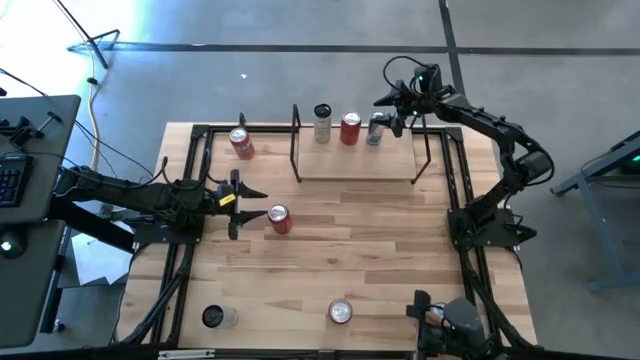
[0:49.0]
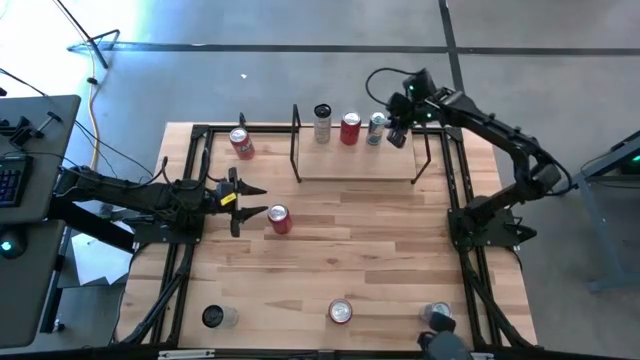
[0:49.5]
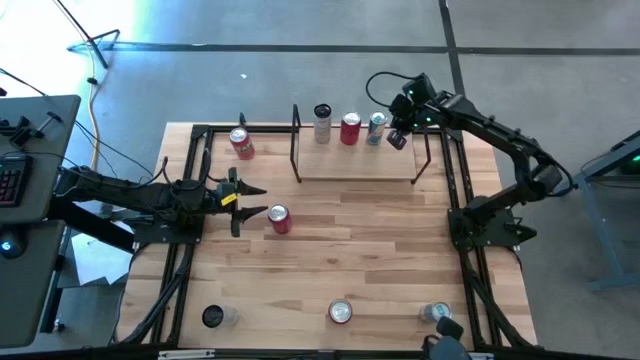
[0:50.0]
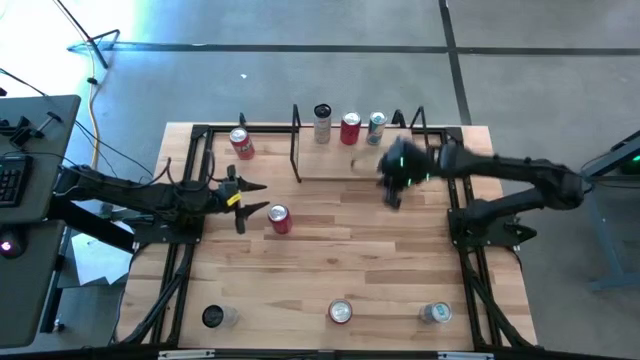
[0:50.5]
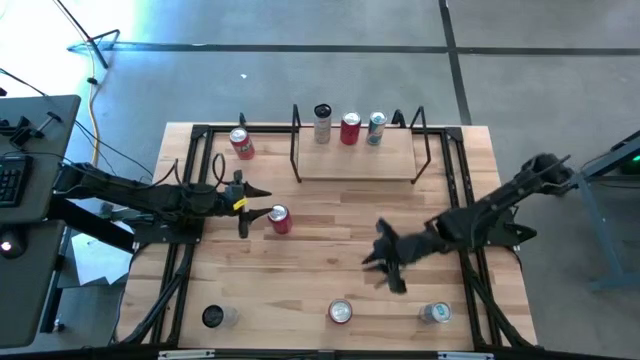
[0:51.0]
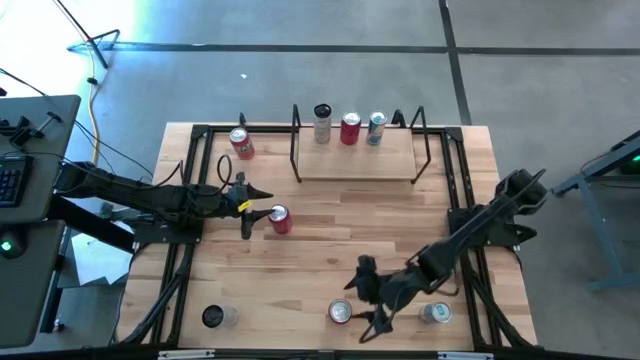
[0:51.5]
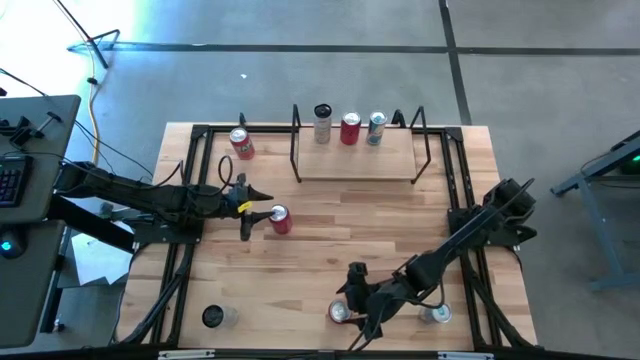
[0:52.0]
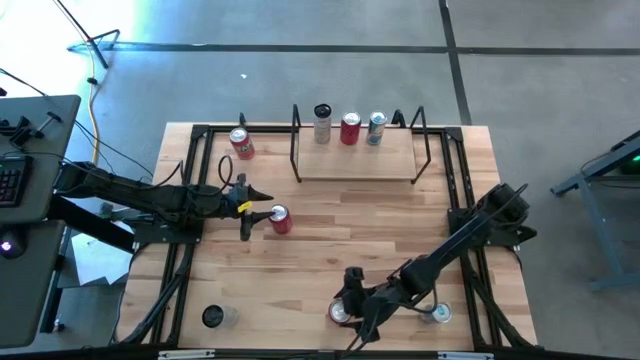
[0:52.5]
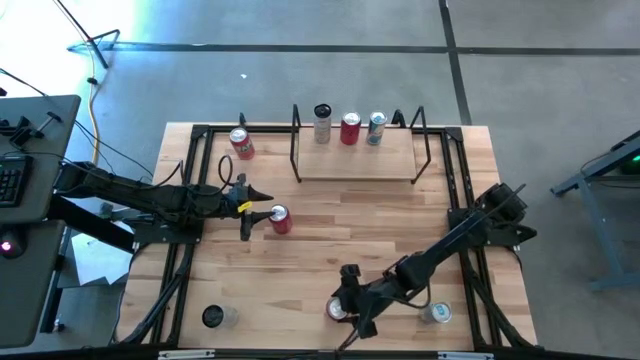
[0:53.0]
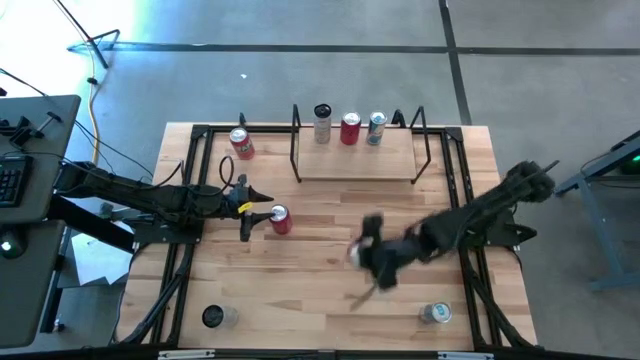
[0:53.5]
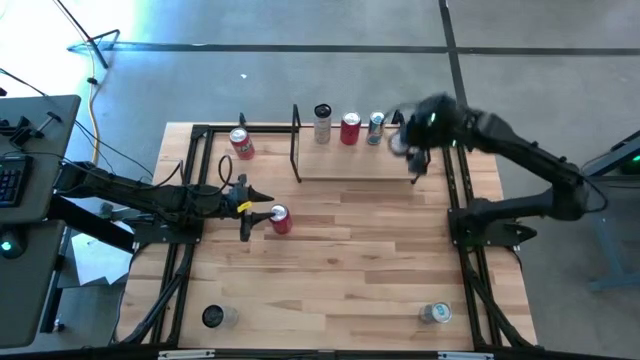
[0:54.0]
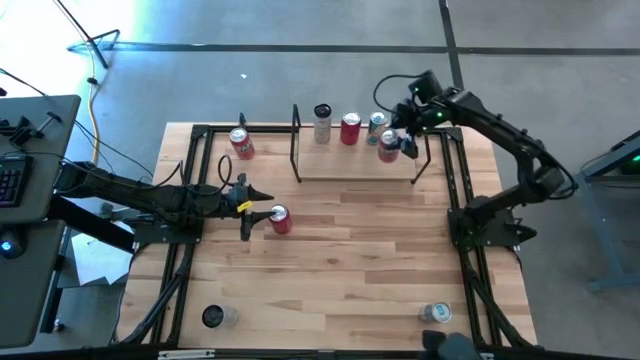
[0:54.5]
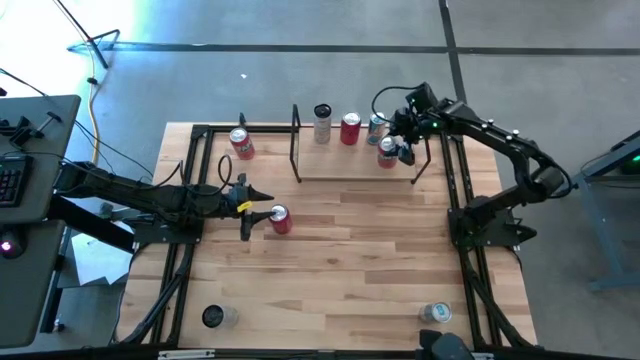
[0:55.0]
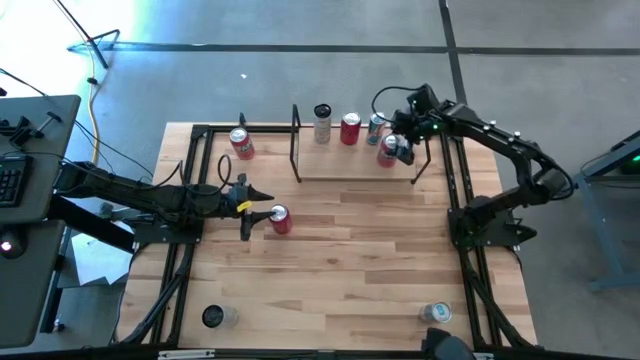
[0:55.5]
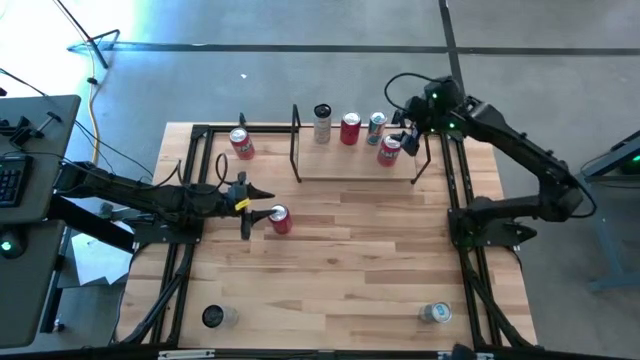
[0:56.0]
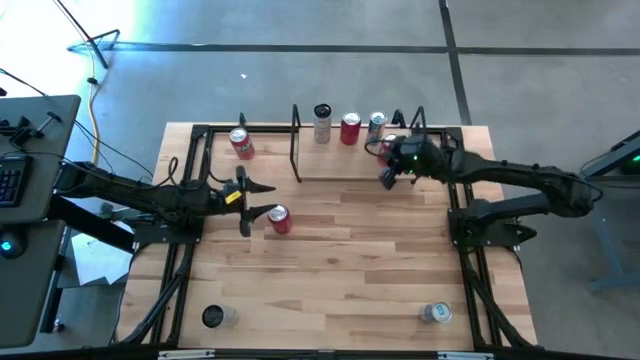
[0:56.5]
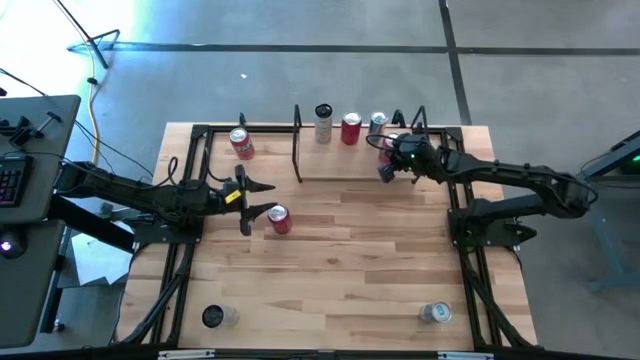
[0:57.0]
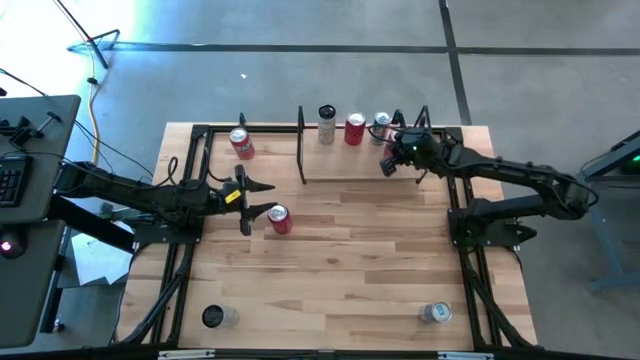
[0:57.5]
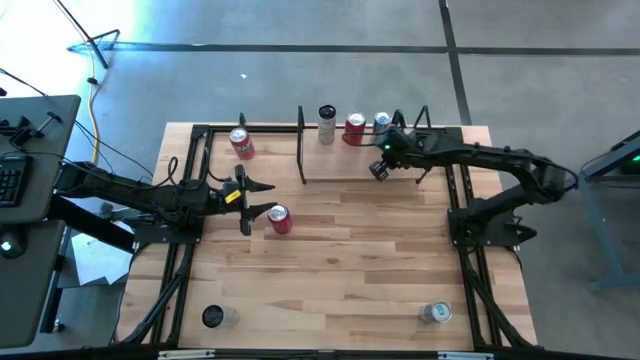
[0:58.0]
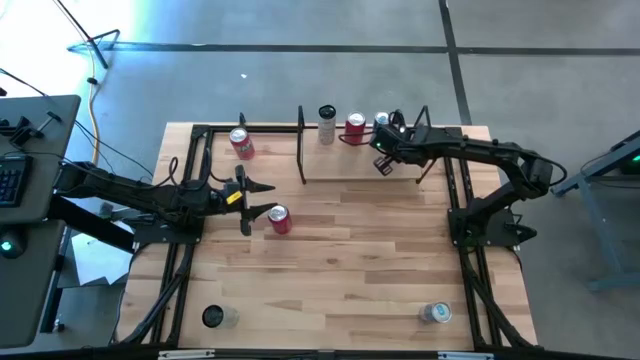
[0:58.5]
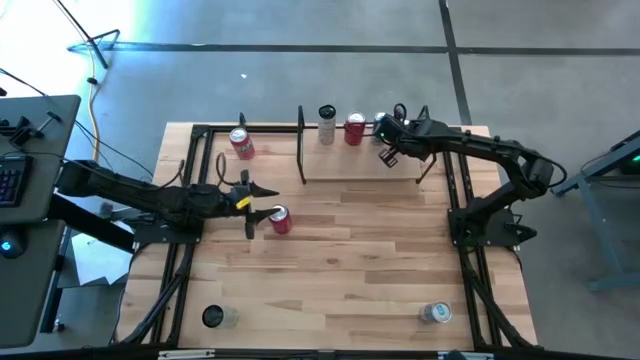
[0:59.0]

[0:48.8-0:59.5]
Task: Place canned beverage on shelf
Put the bottom can on the shelf

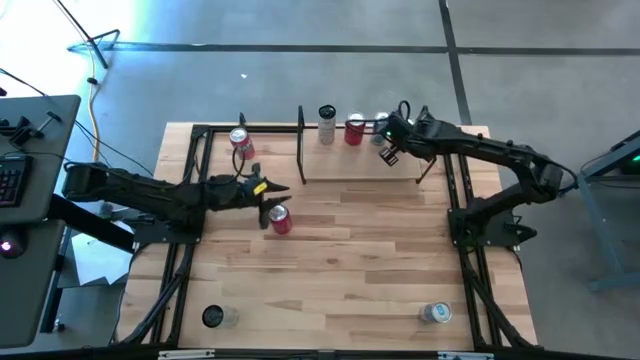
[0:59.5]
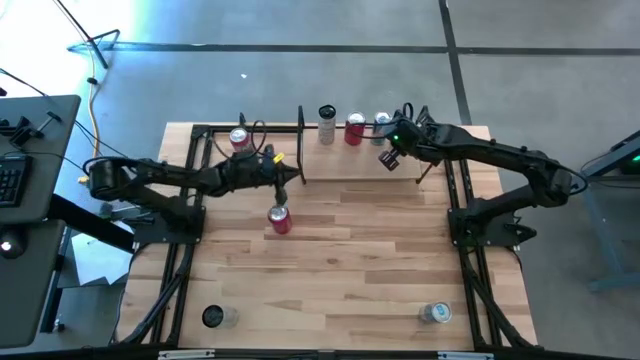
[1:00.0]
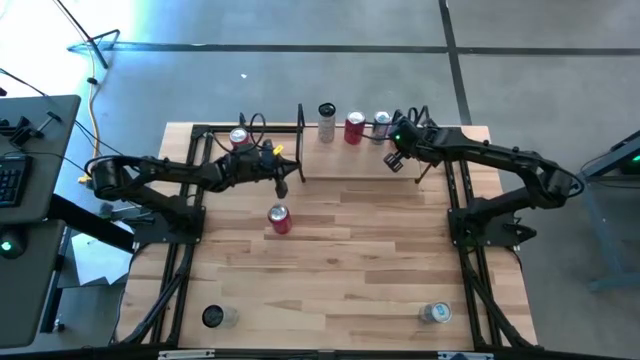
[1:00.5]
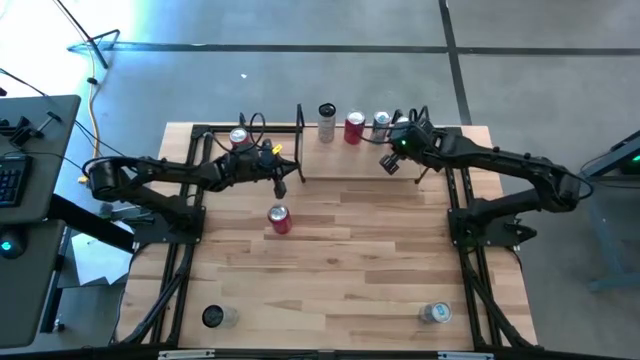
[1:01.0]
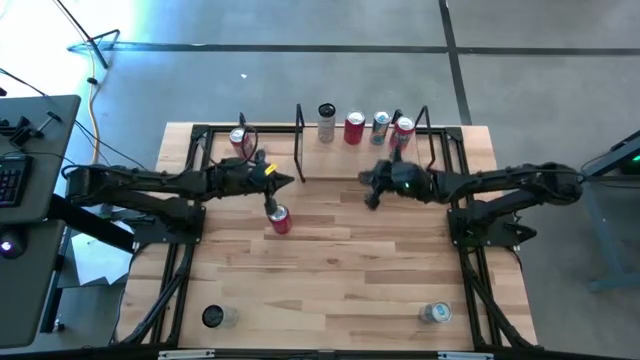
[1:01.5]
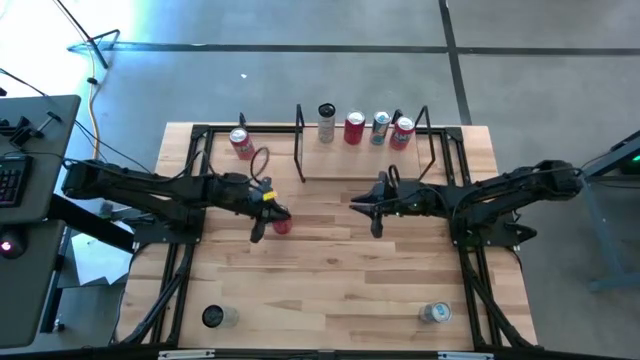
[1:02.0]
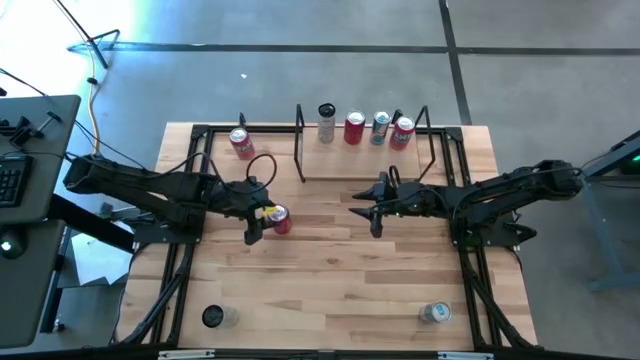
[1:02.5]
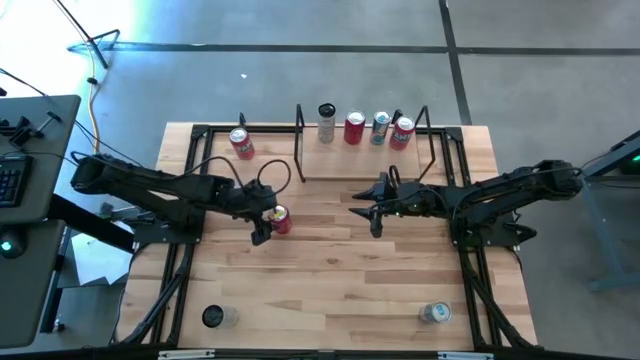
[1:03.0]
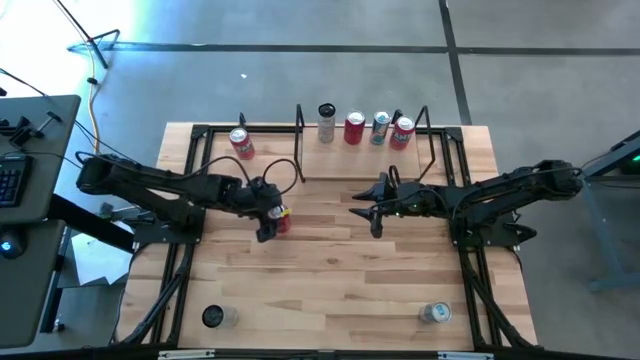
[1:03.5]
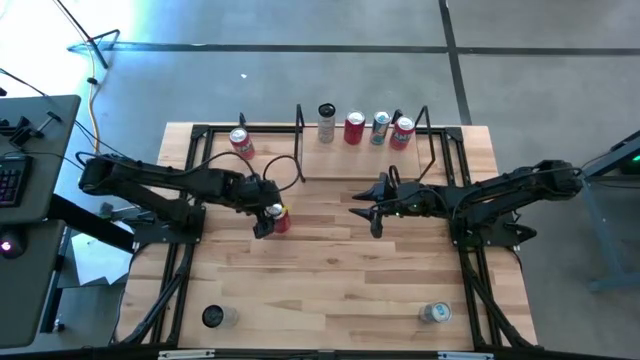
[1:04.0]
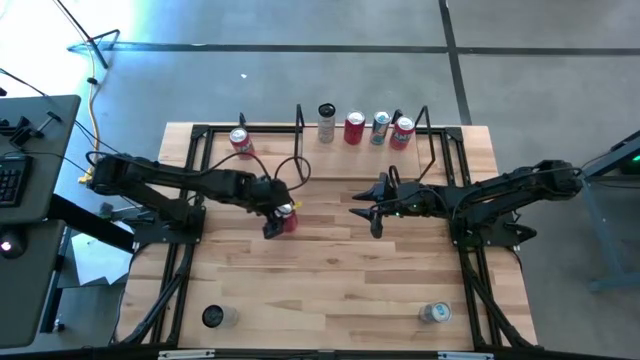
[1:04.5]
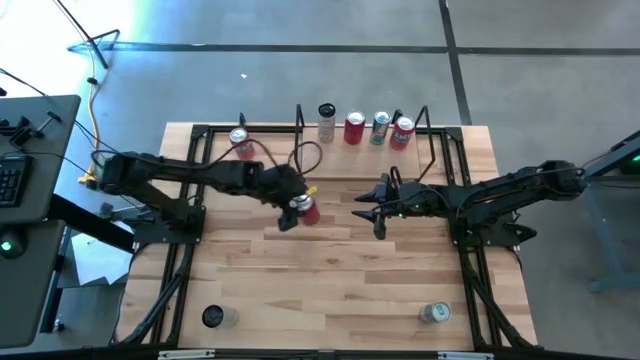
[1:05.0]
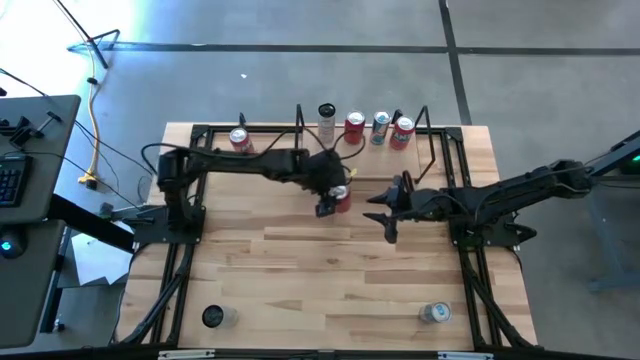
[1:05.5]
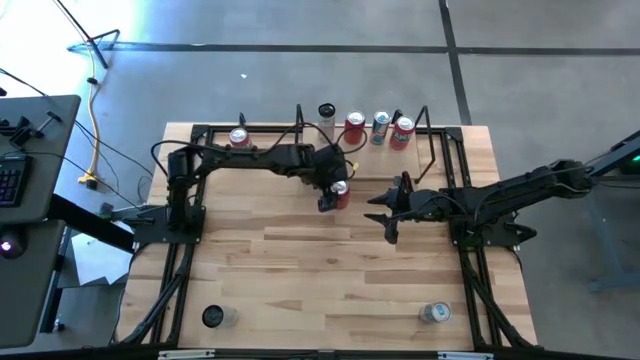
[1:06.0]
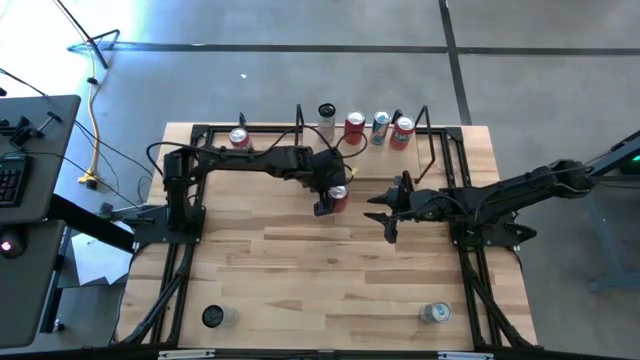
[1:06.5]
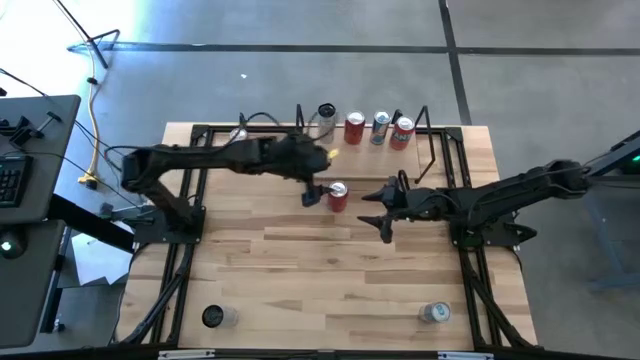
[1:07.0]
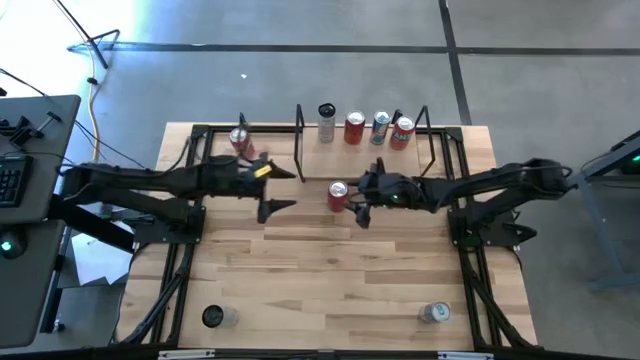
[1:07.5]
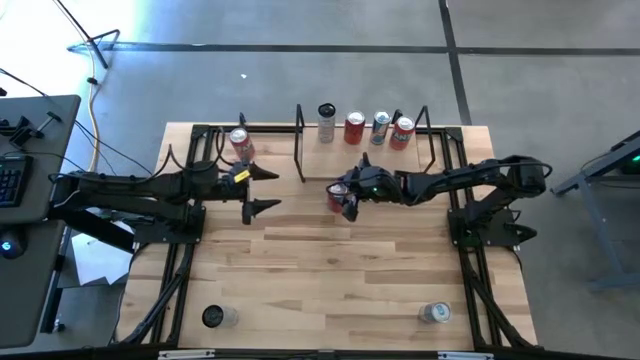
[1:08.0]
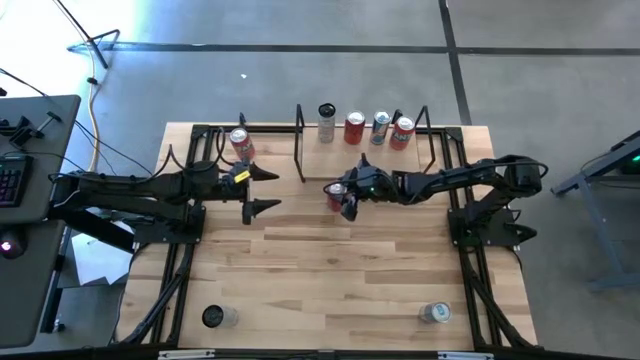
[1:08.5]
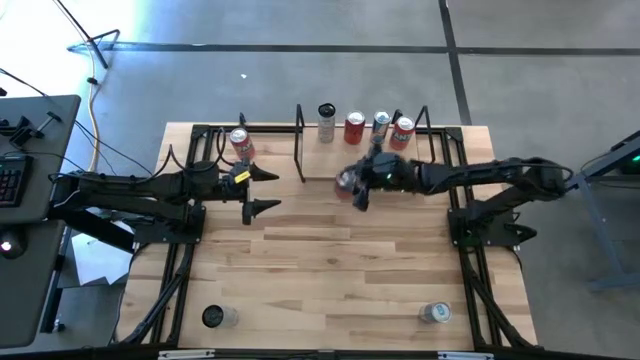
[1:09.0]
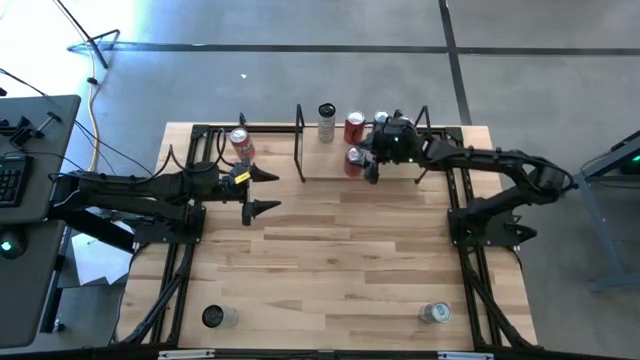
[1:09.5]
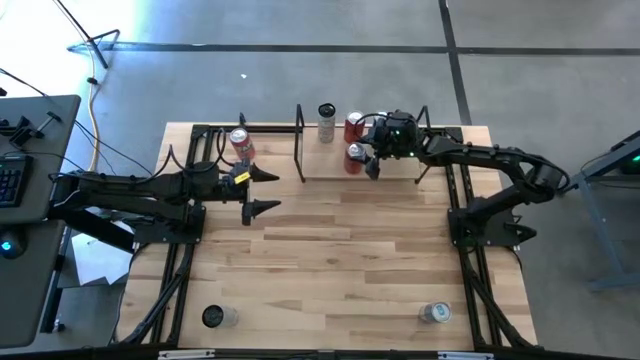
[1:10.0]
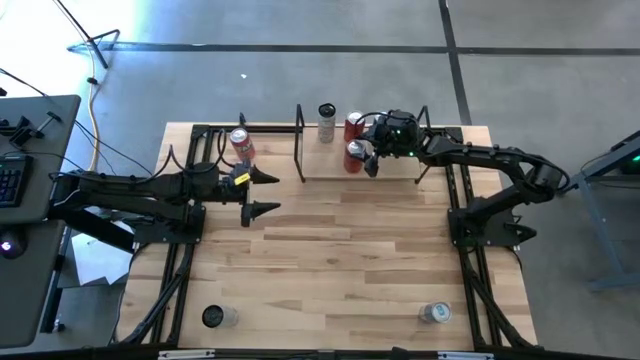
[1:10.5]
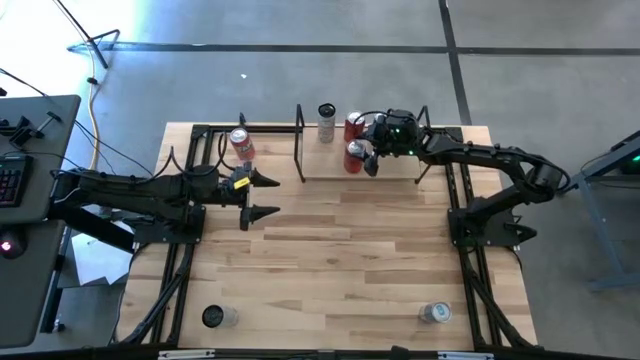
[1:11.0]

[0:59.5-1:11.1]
Put the red soda can aligned with the red soda can on the shelf
